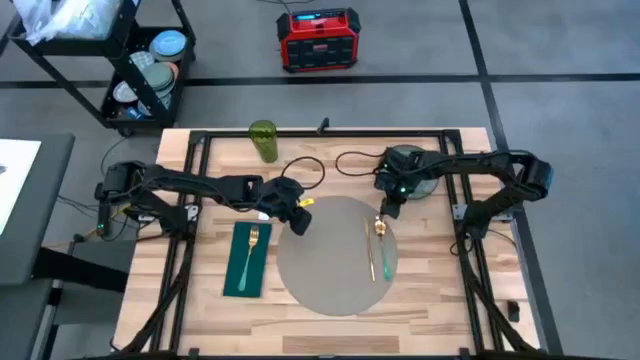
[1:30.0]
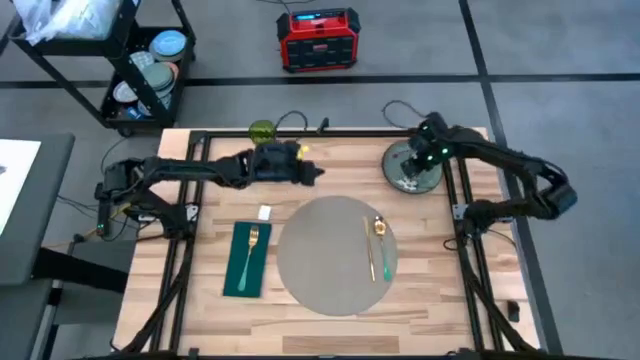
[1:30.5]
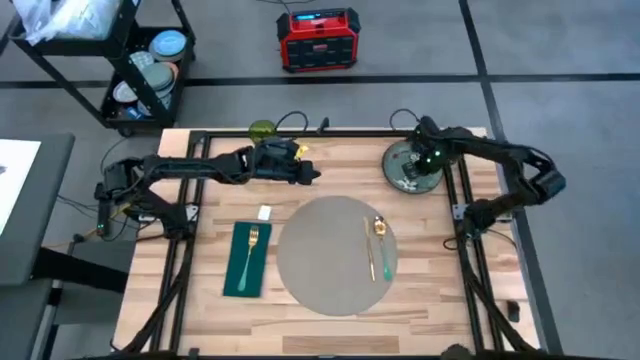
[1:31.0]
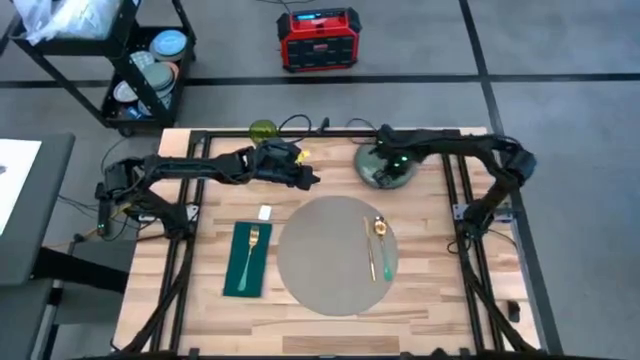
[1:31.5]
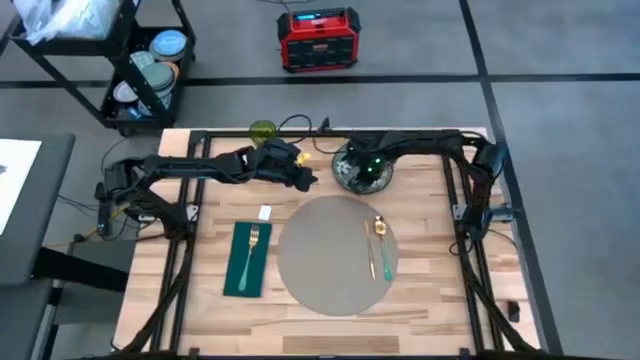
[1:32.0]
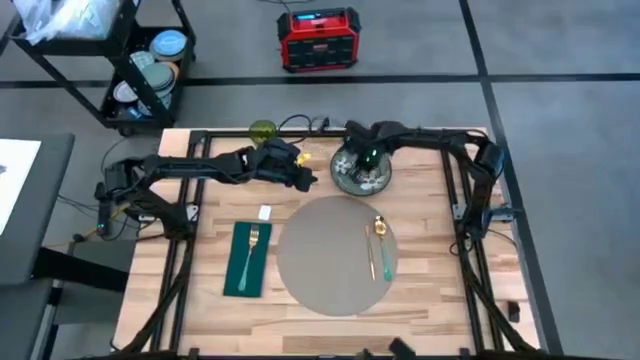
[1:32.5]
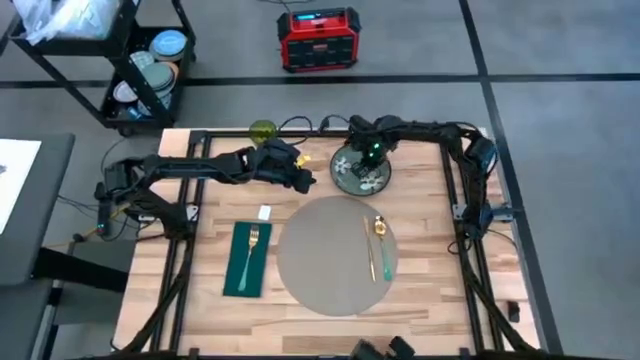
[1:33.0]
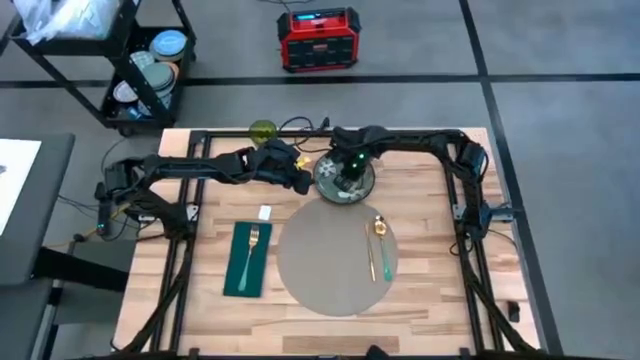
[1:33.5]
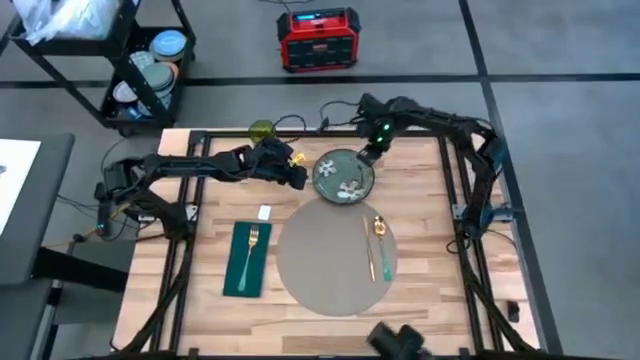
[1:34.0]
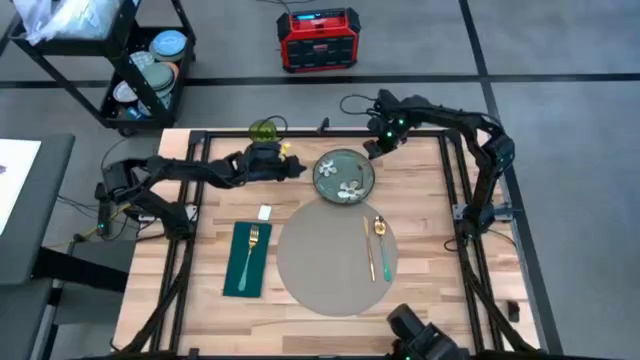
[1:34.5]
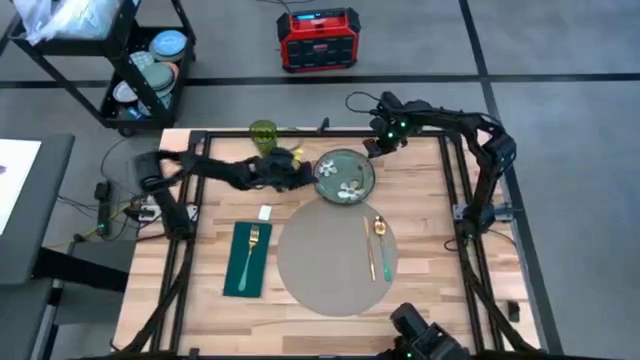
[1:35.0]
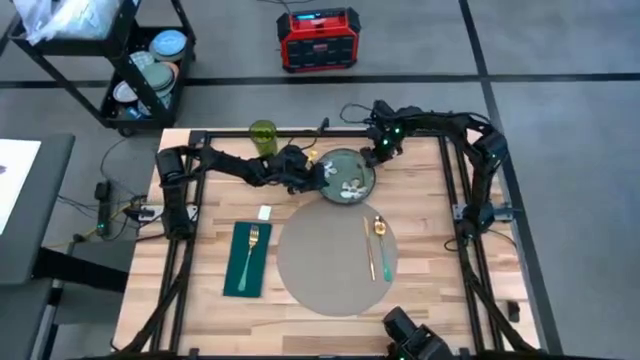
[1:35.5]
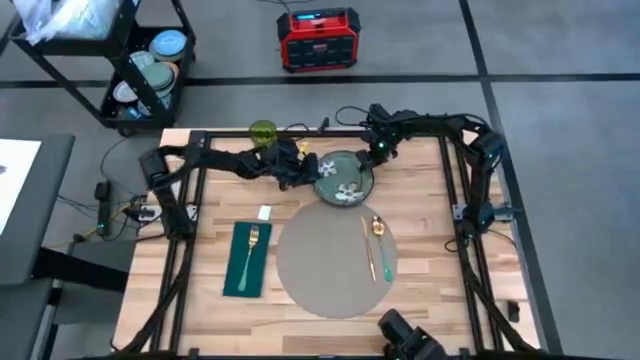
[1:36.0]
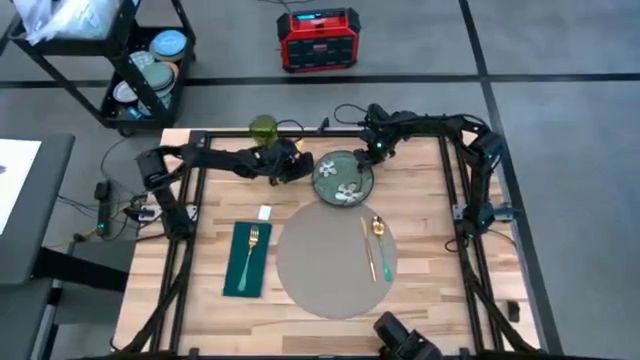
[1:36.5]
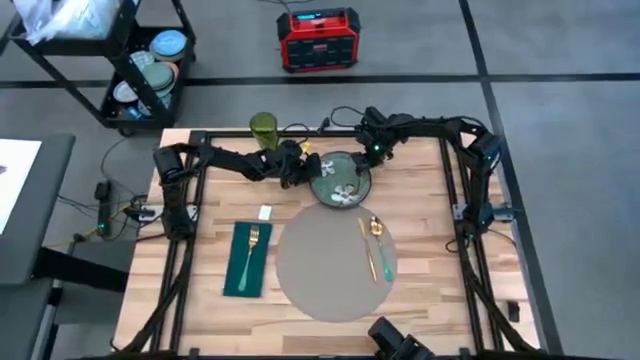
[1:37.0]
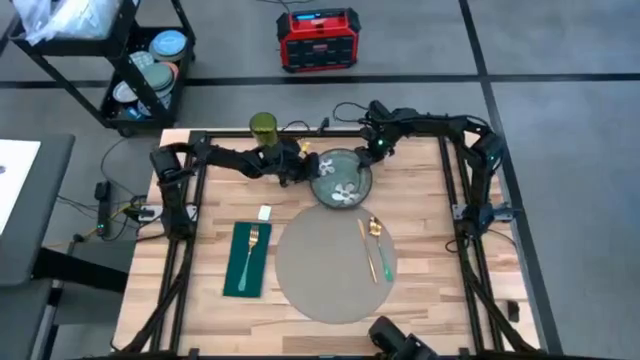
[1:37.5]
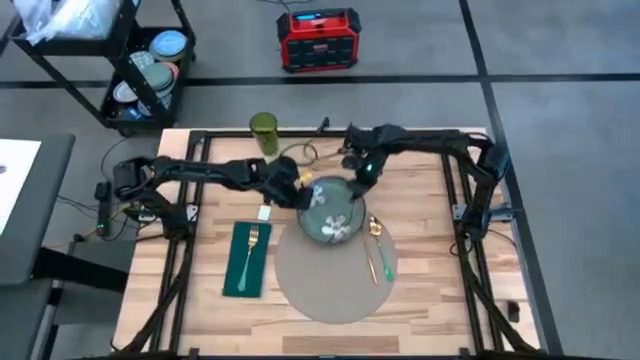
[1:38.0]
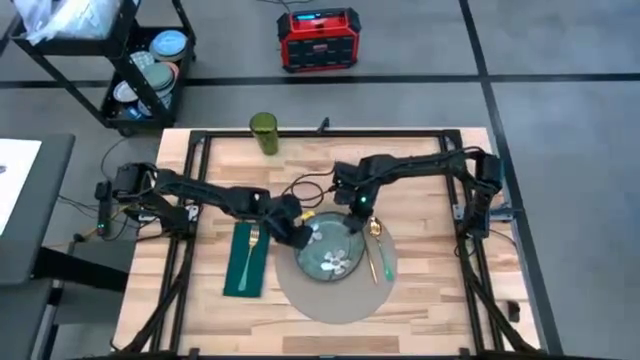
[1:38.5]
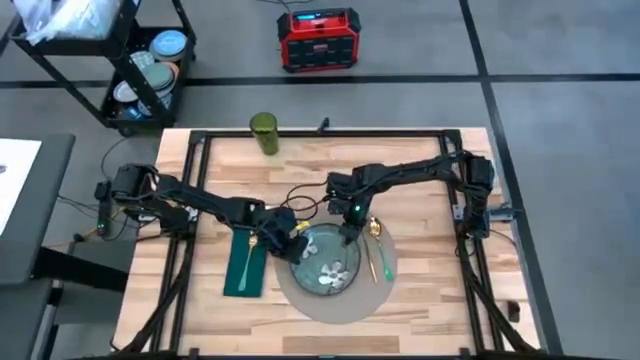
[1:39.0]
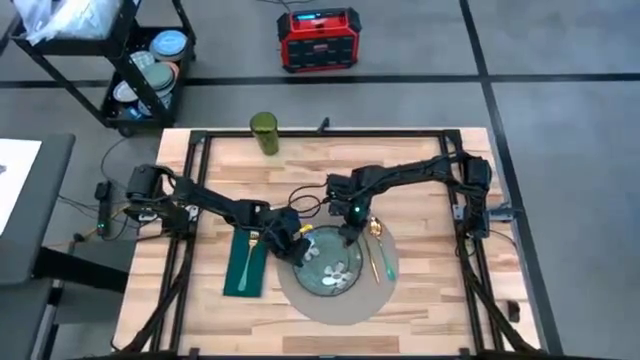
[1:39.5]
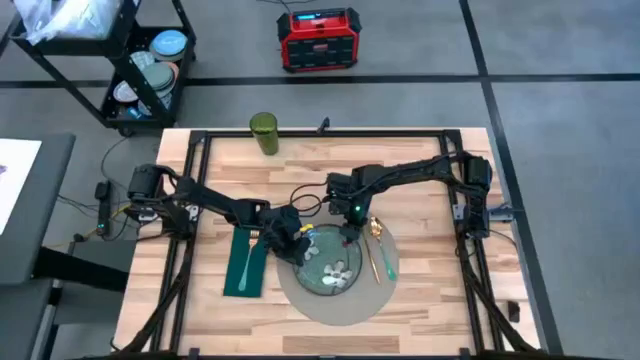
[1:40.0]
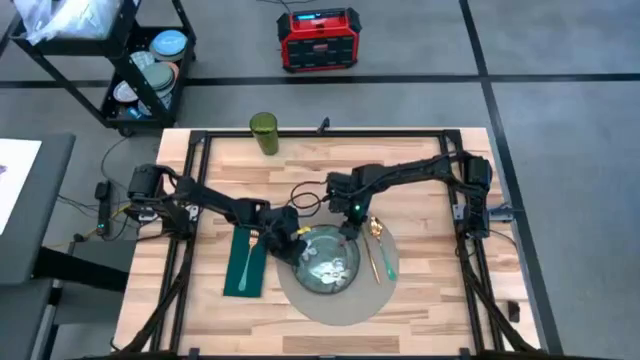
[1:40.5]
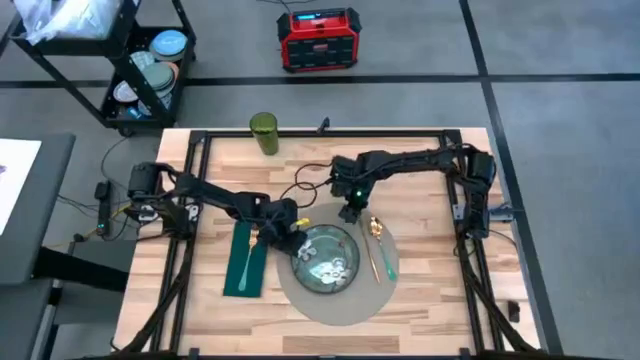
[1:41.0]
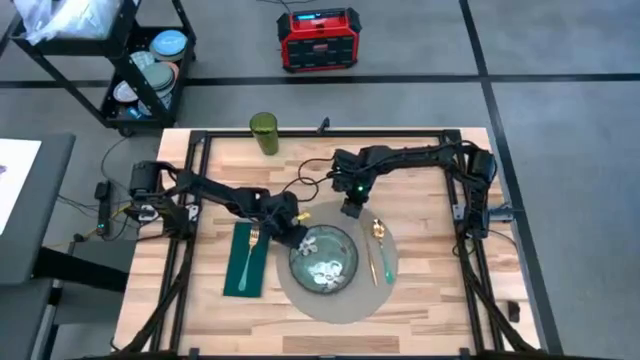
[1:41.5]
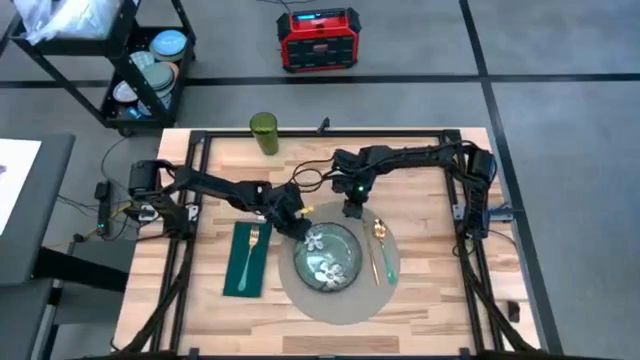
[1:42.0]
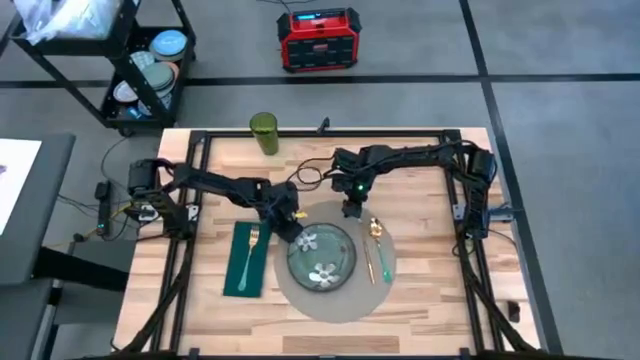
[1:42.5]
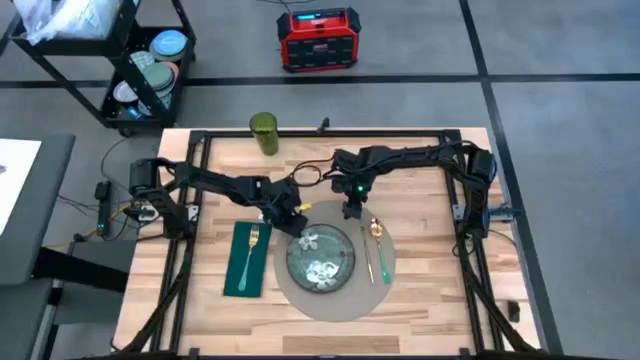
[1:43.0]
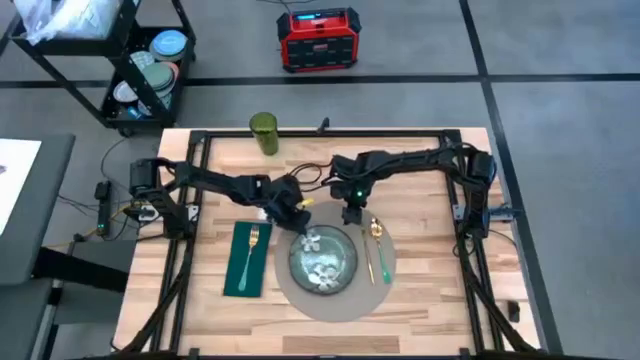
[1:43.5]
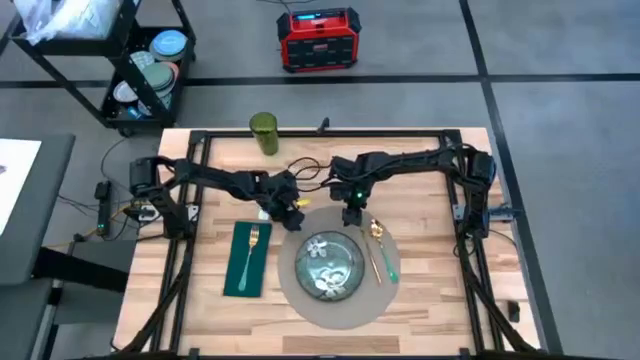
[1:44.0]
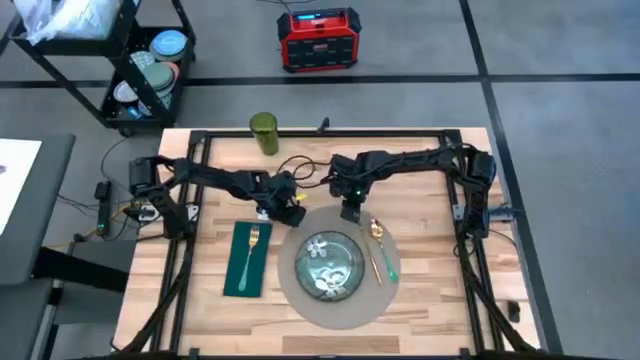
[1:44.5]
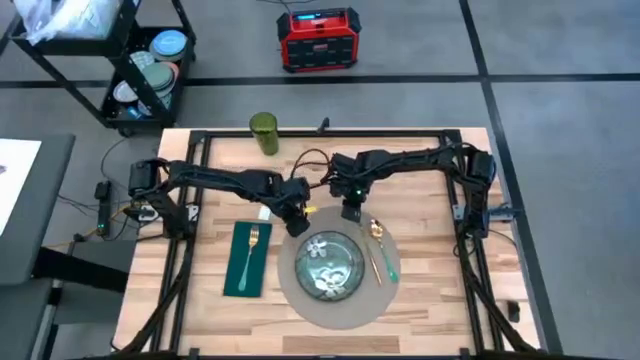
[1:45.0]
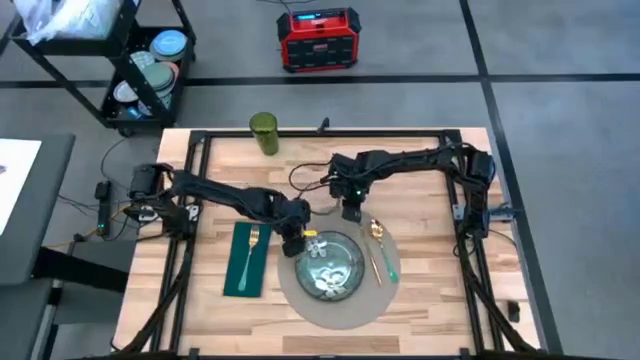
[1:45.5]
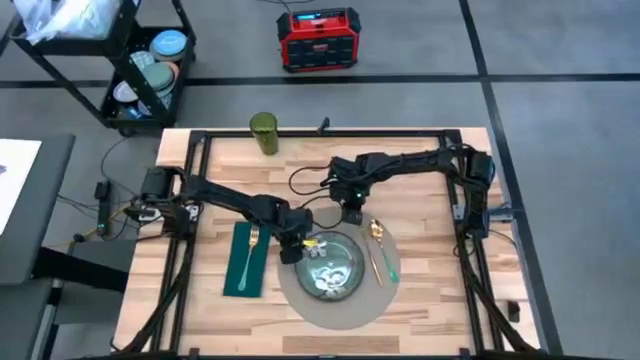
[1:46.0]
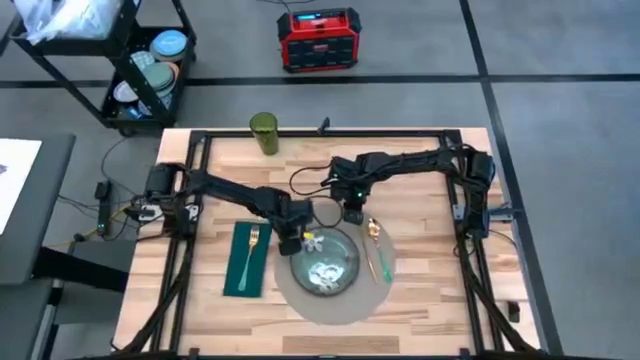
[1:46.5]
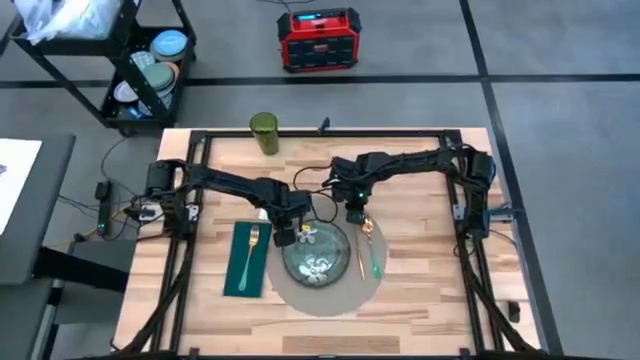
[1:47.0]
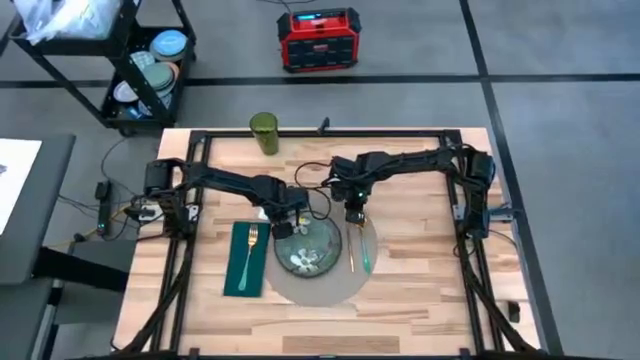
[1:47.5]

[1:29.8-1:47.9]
Task: Set table place
Put the green plate on the gray table mat

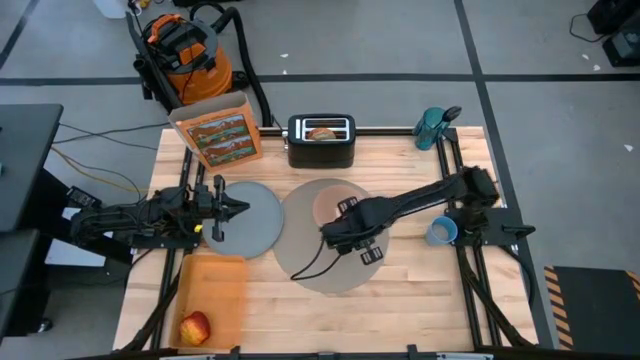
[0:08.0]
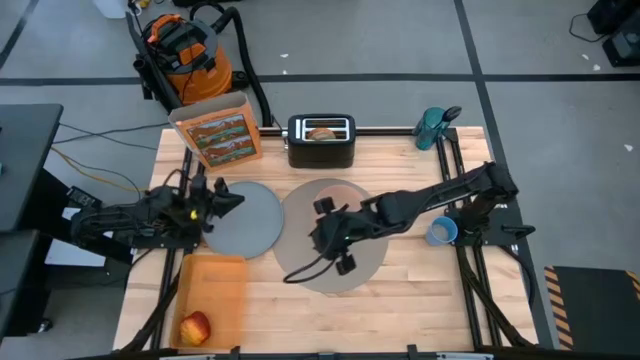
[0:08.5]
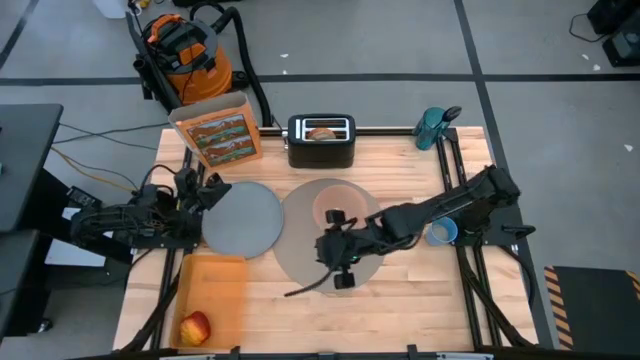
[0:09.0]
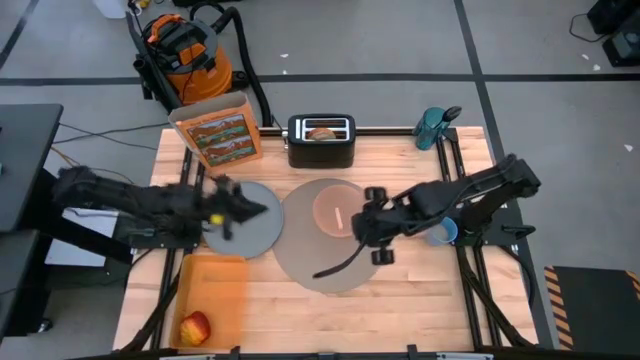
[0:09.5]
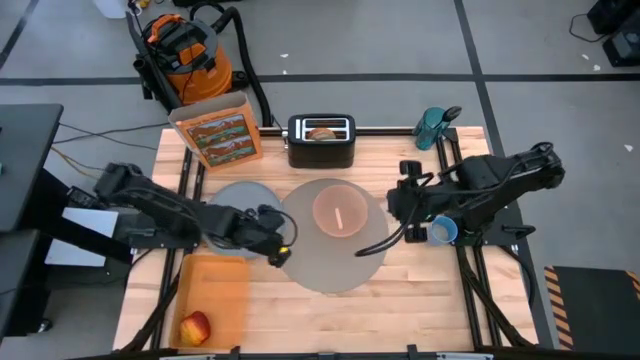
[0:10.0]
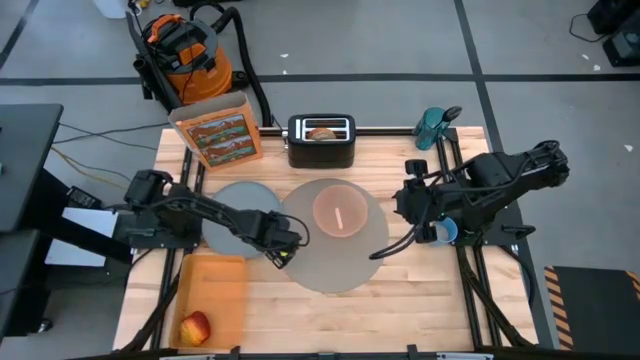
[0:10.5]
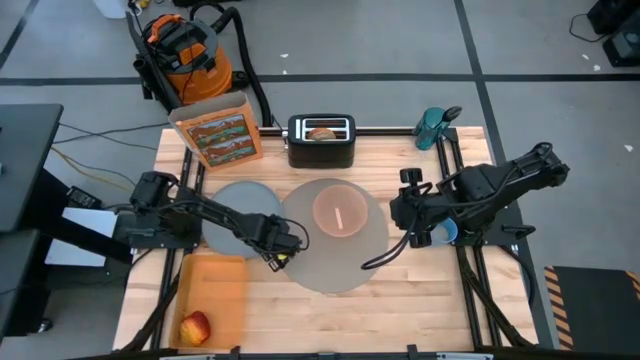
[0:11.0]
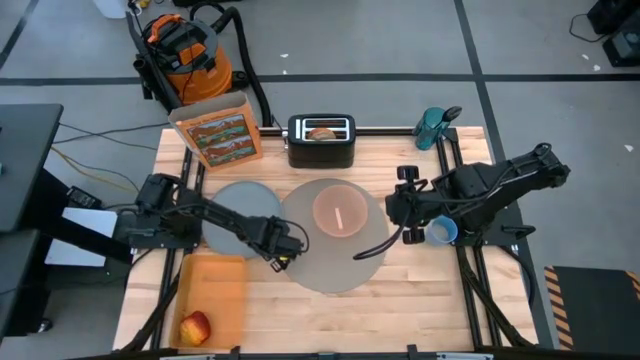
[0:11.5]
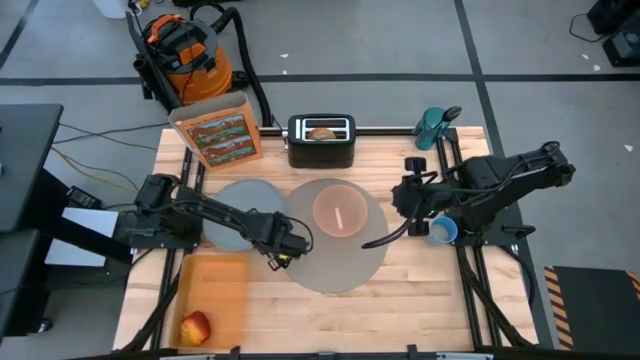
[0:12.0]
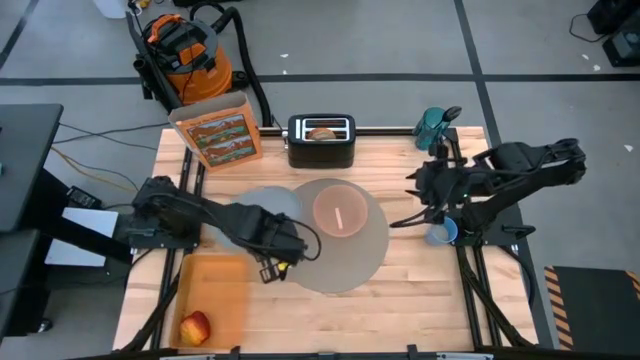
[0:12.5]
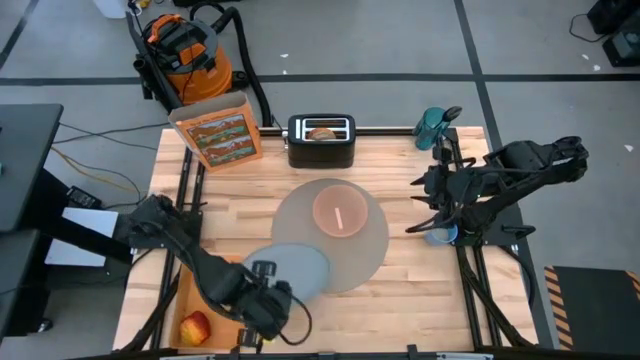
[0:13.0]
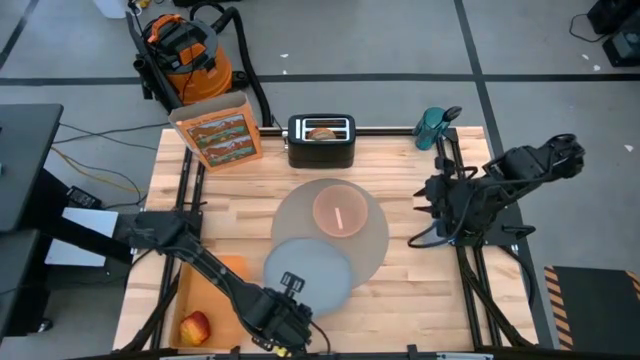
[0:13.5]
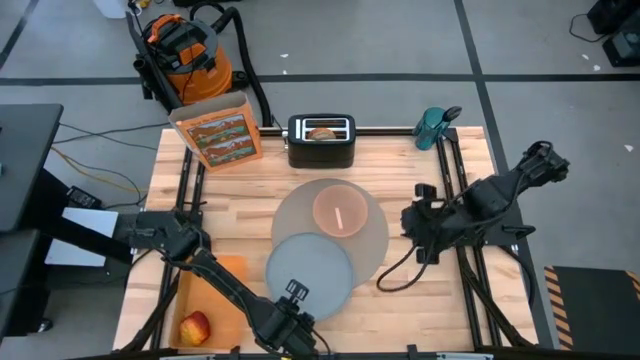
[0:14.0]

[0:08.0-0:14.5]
Task: Arrange a breakfast setting
Put the blue plate on the bottom left of the gray placemat
